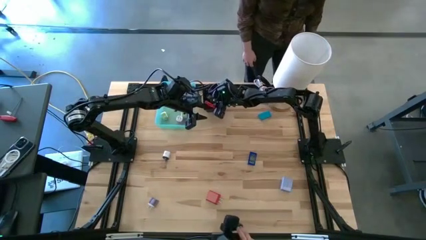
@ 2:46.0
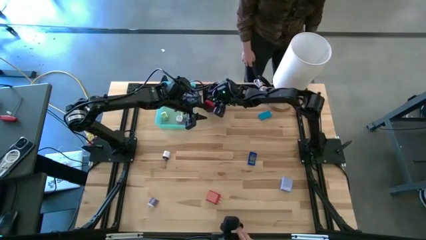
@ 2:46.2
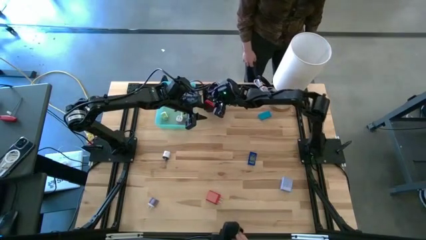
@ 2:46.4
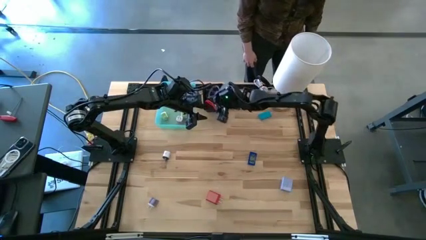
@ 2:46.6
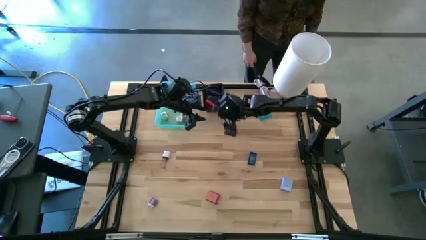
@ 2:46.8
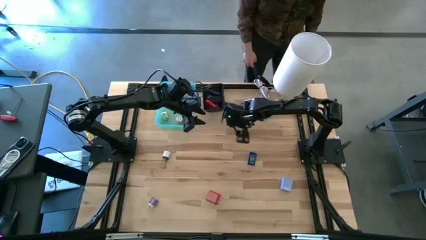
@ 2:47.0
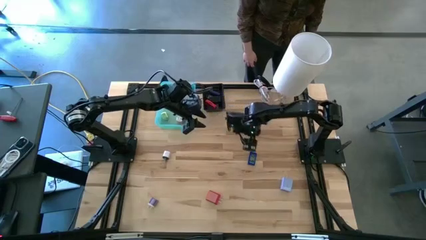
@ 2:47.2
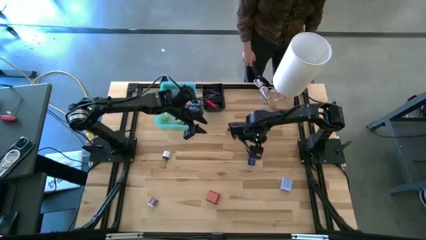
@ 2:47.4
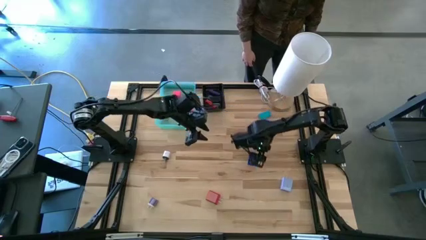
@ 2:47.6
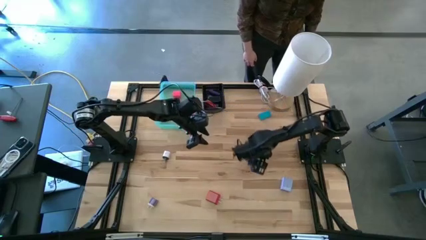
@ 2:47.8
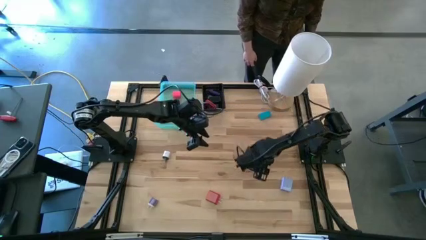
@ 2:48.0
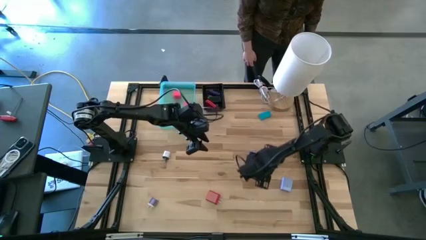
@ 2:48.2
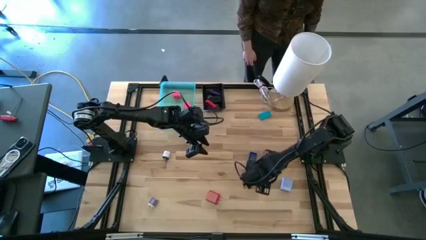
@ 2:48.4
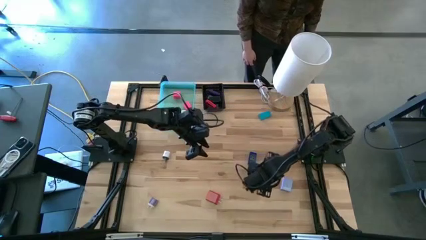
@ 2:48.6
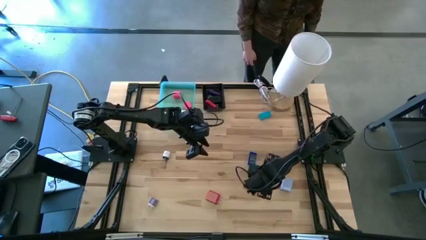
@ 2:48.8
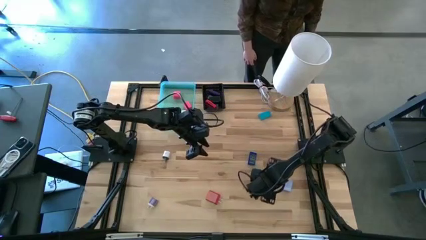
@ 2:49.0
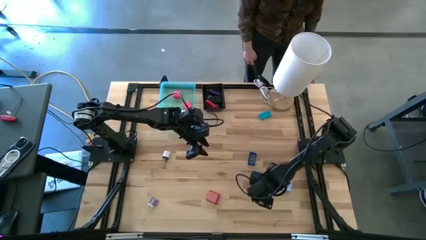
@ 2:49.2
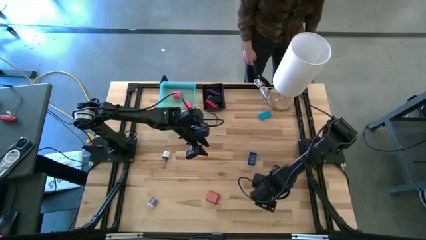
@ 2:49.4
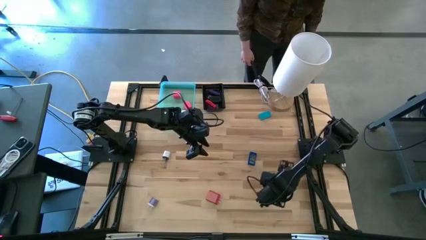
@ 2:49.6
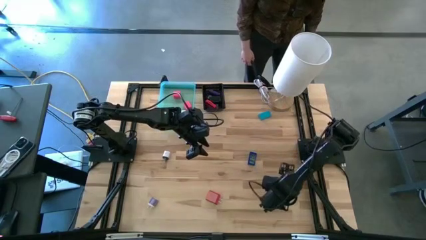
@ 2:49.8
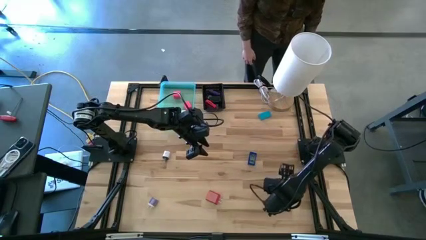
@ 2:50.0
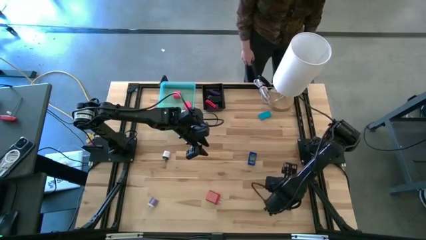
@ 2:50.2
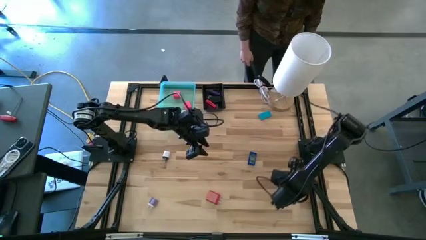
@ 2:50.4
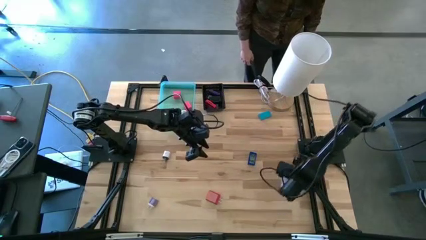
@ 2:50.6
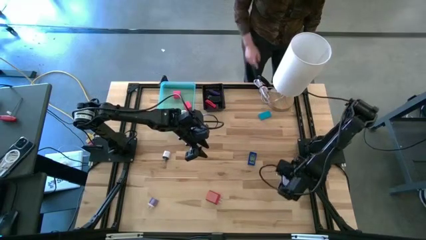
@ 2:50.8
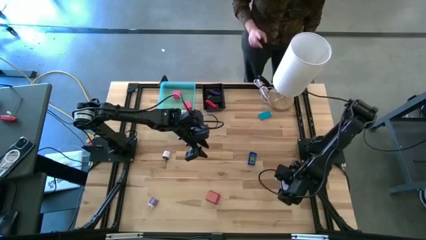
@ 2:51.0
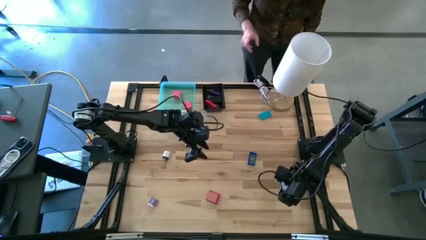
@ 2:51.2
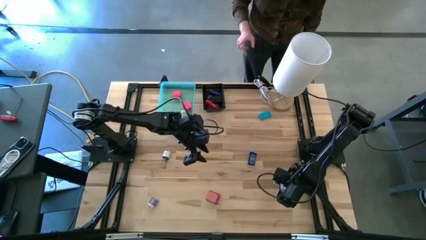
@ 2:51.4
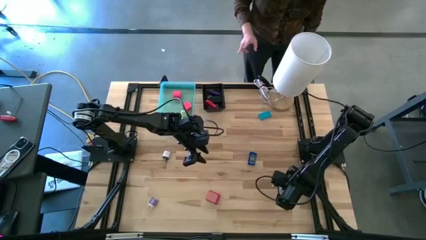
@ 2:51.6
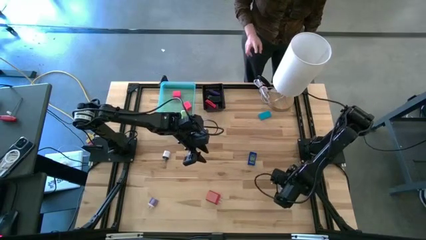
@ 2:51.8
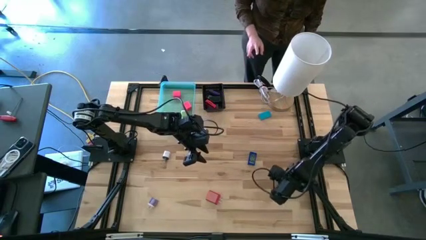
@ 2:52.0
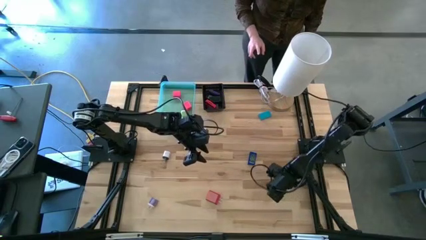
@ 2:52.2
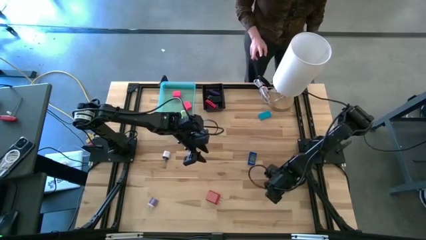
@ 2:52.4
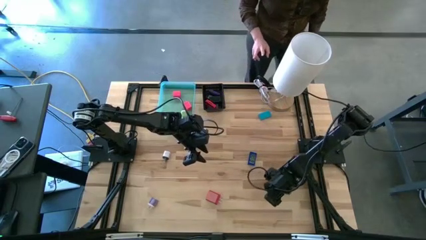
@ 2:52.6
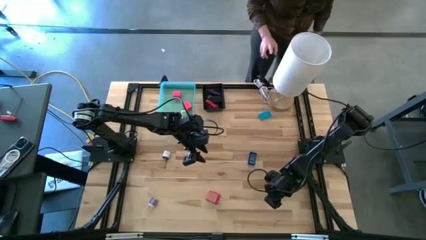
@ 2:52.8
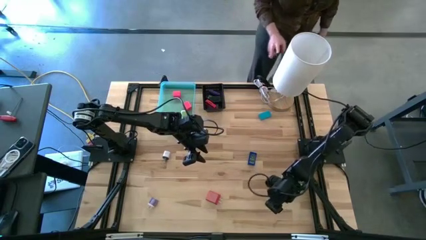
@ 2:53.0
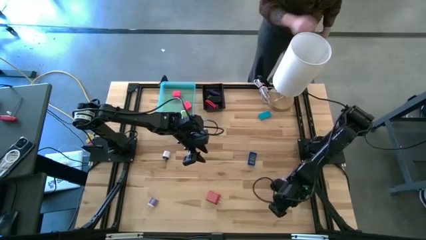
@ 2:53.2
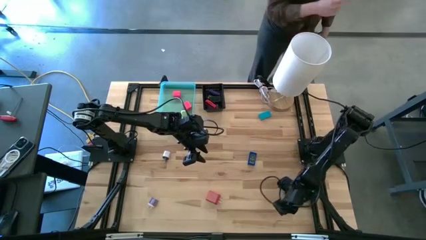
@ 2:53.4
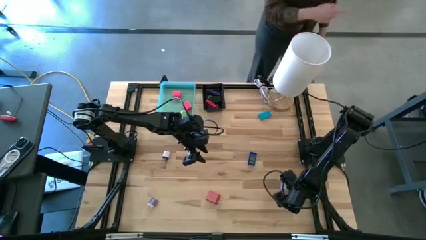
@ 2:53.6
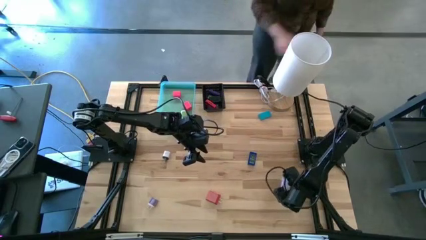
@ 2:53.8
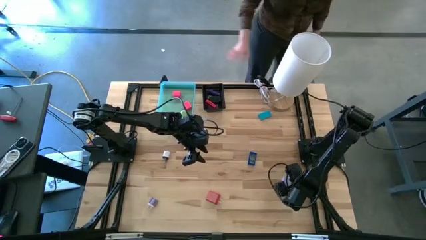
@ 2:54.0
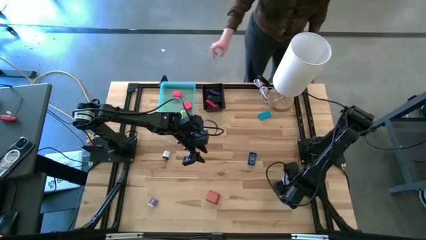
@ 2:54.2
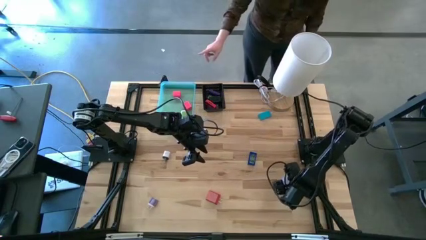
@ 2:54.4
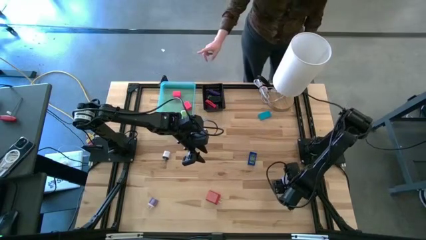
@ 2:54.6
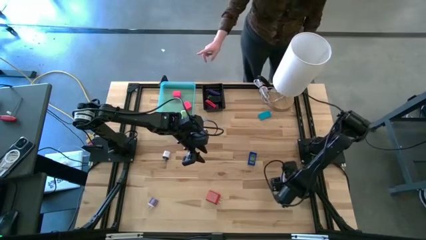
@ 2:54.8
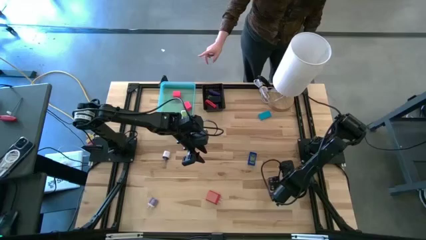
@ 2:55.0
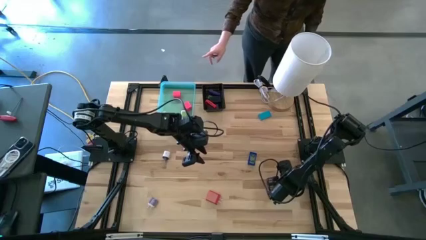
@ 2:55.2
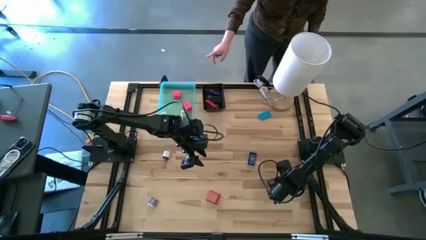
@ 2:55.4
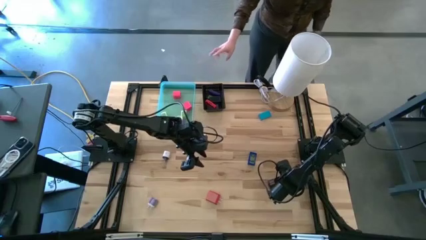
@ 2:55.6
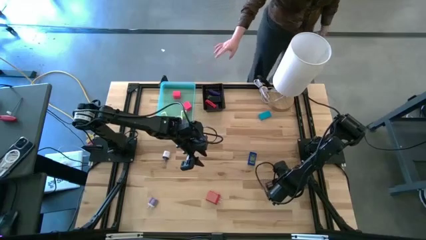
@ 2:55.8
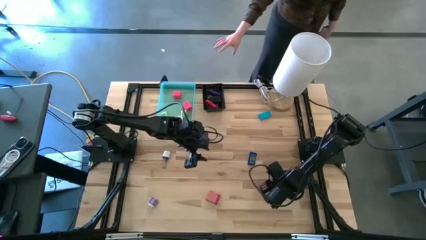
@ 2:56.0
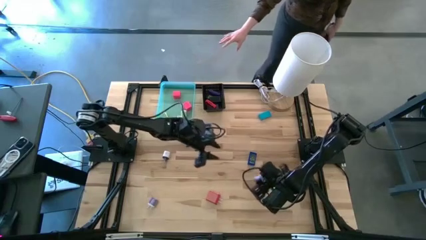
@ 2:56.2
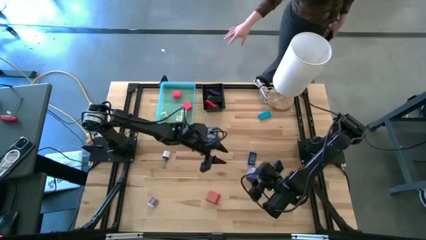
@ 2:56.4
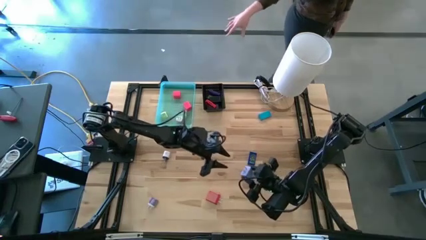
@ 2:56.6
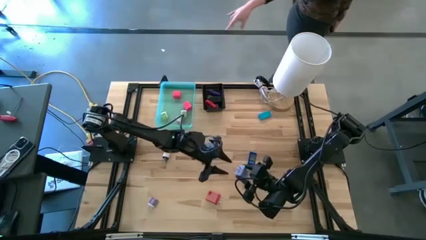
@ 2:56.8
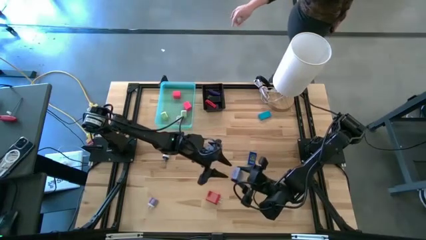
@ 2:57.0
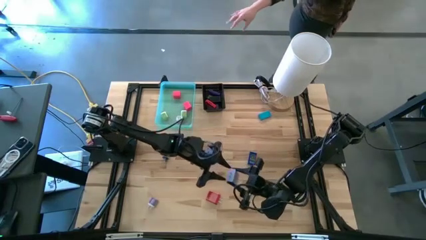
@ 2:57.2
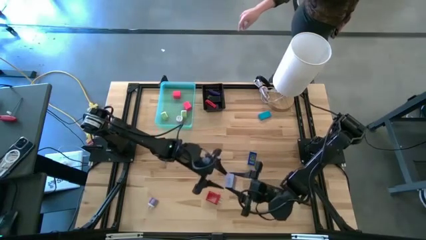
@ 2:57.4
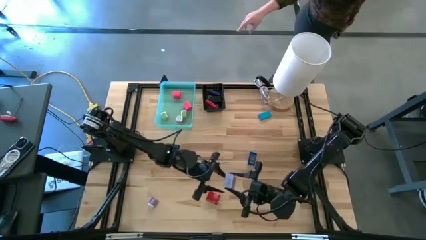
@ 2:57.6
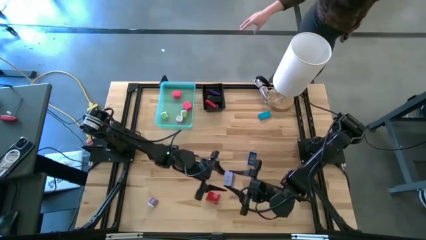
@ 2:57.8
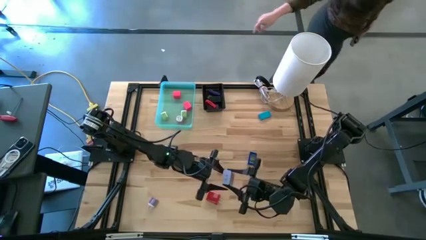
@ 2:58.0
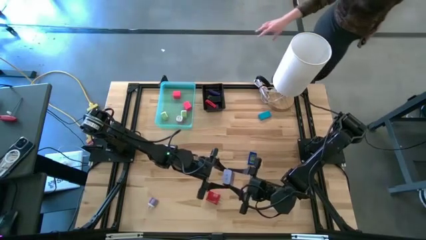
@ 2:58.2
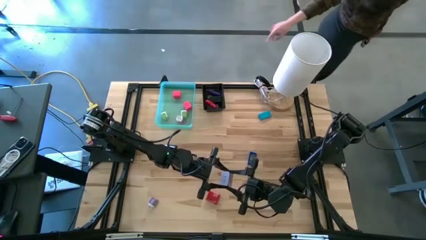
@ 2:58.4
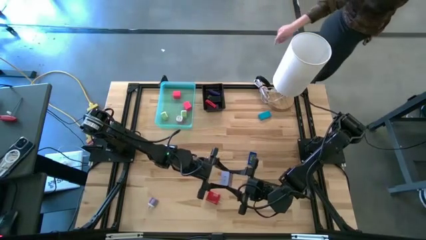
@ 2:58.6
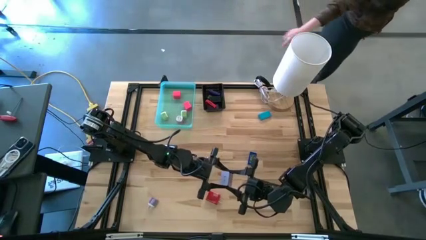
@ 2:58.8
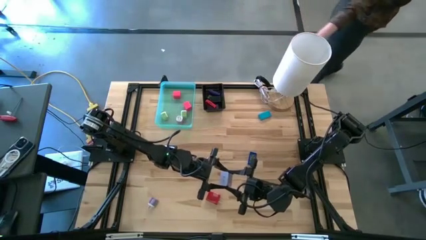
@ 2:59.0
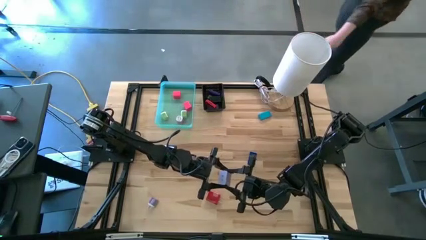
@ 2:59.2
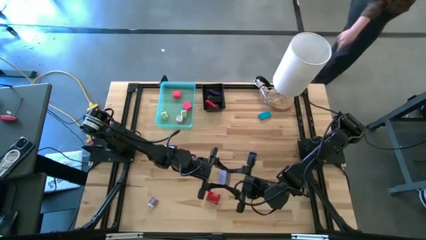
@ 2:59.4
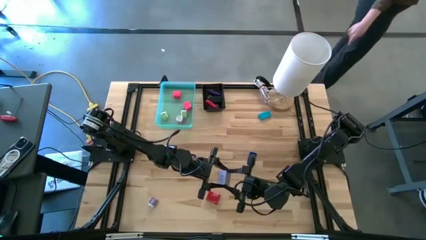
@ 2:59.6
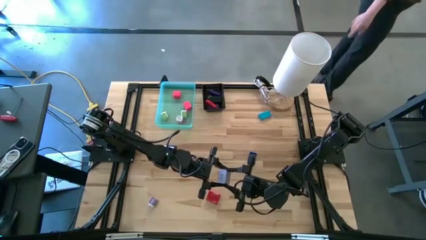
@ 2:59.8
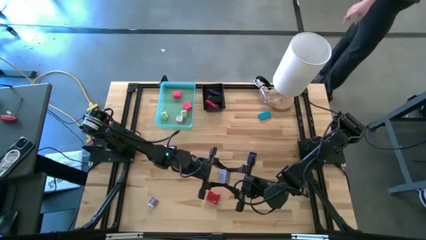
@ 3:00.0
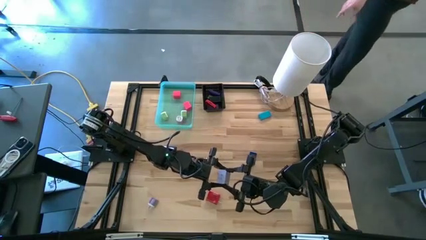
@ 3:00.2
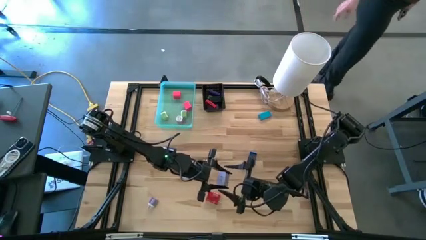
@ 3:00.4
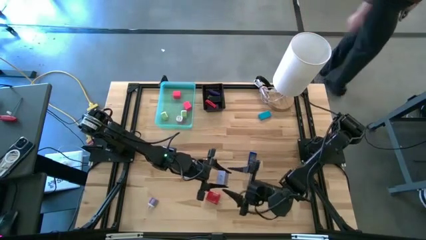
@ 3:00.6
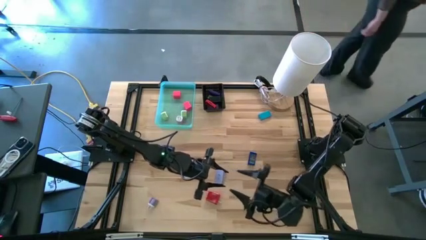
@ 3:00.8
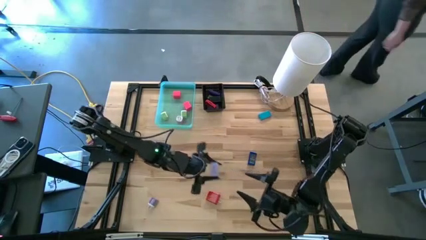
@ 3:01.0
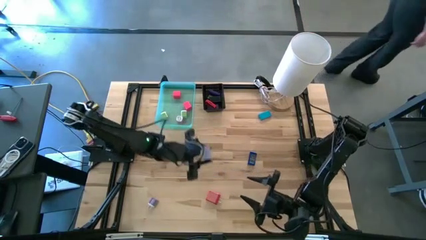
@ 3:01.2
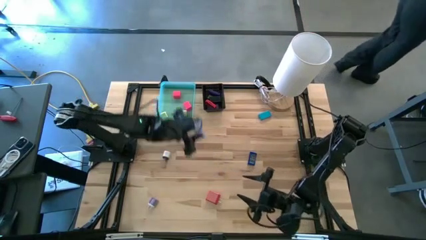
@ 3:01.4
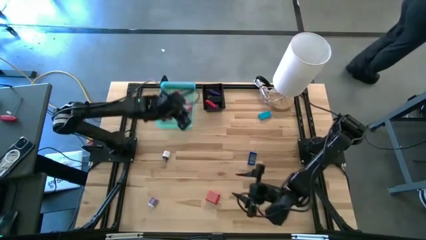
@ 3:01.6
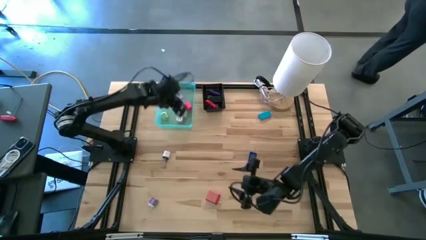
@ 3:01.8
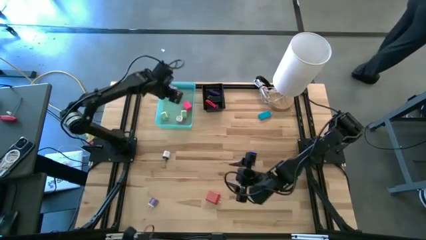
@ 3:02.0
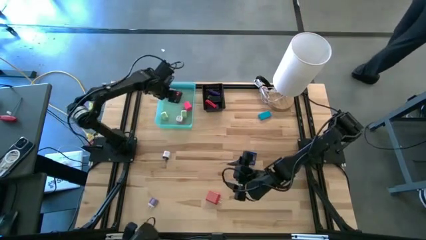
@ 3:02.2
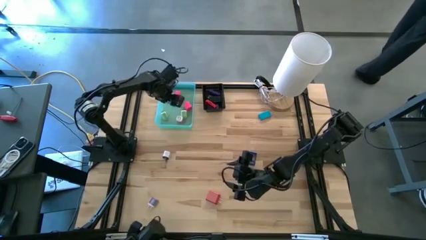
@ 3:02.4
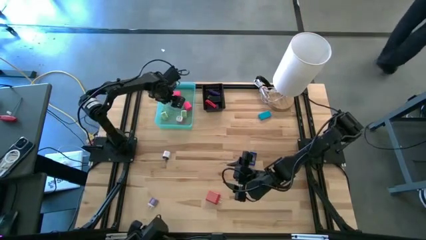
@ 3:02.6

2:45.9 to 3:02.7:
Task: Pick & Place Office items
Put the right purple charger adapter into the green bin
